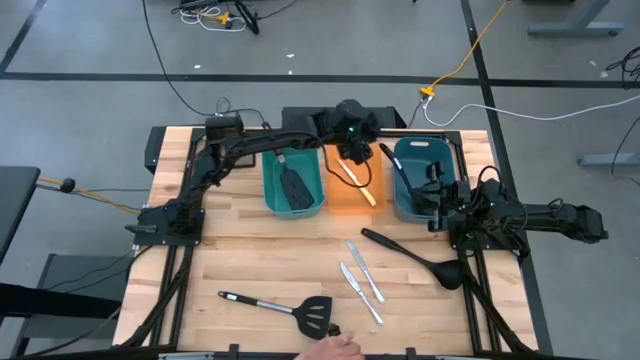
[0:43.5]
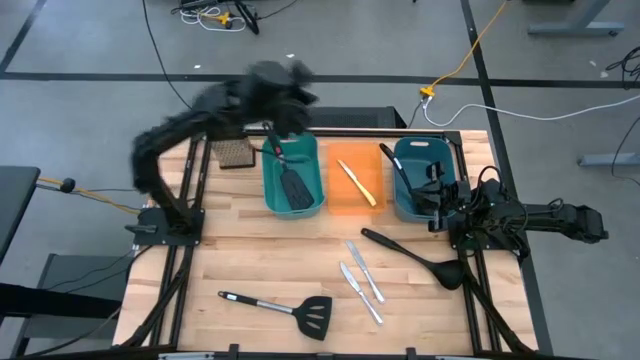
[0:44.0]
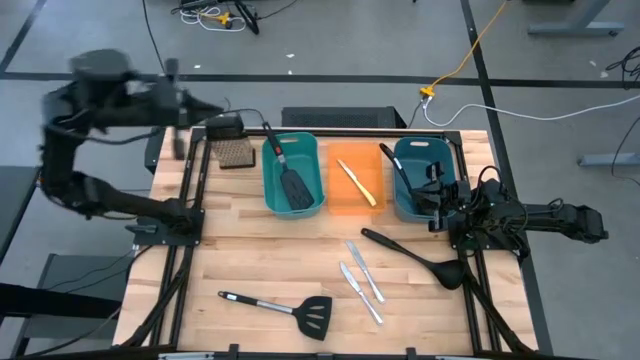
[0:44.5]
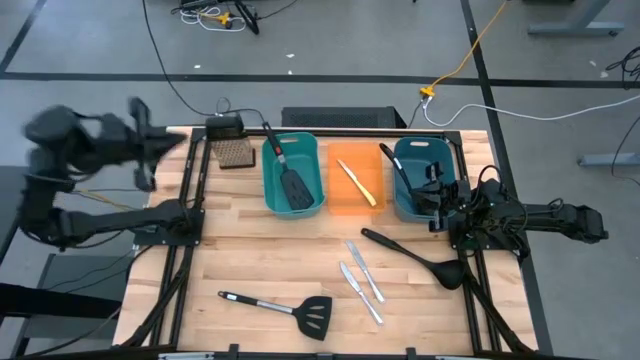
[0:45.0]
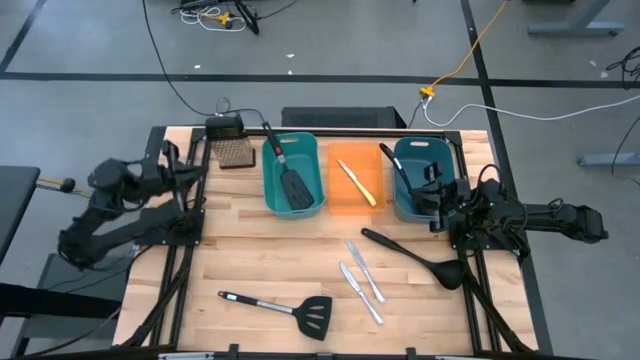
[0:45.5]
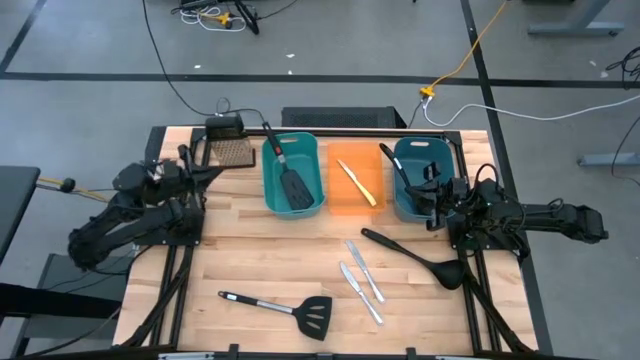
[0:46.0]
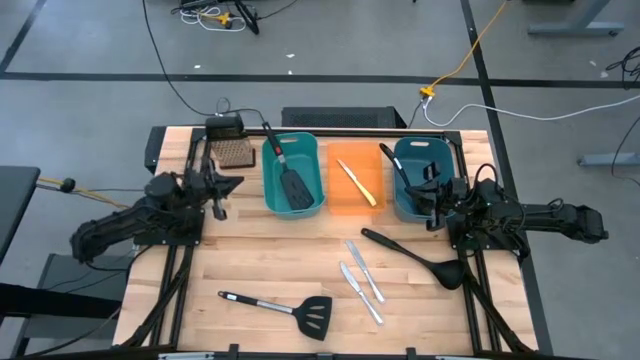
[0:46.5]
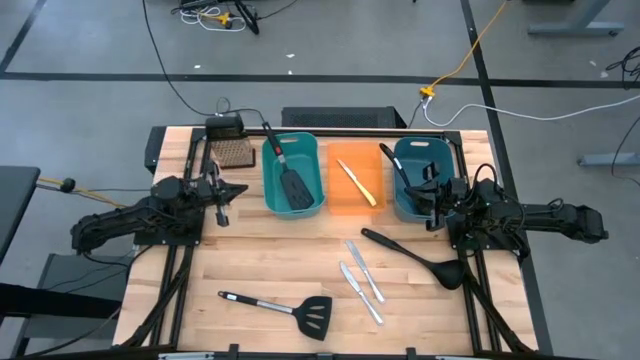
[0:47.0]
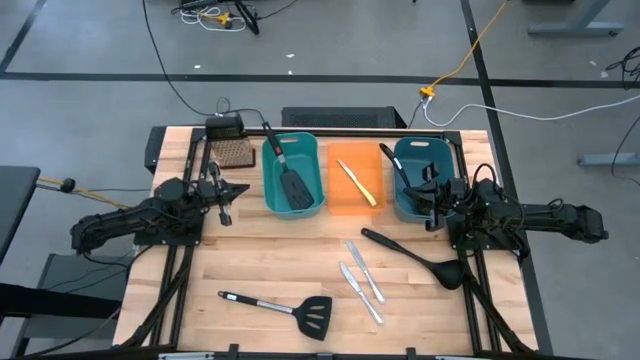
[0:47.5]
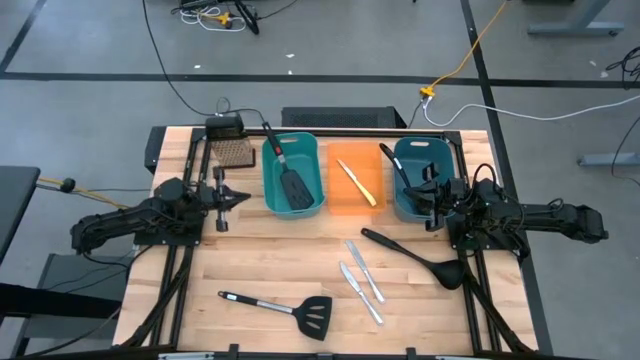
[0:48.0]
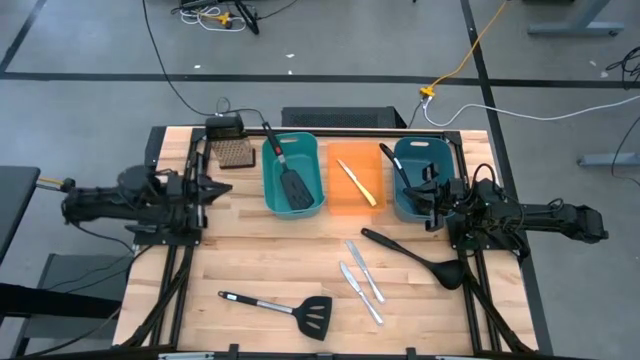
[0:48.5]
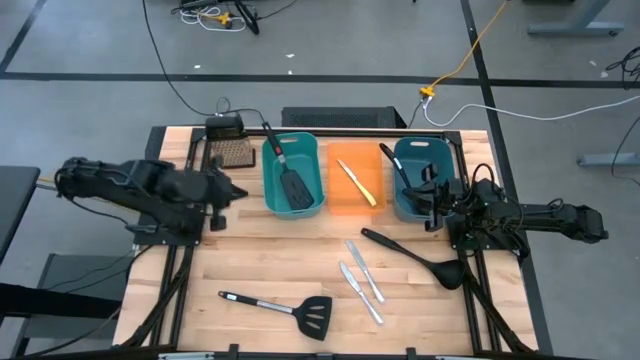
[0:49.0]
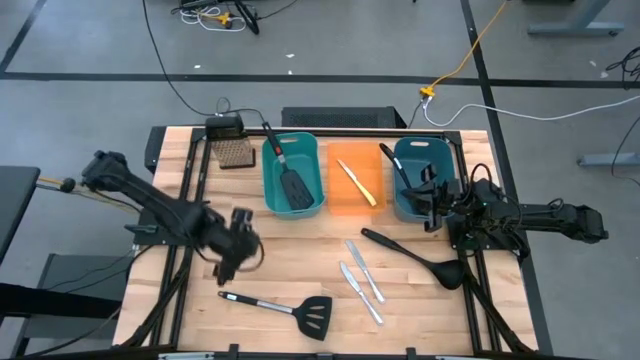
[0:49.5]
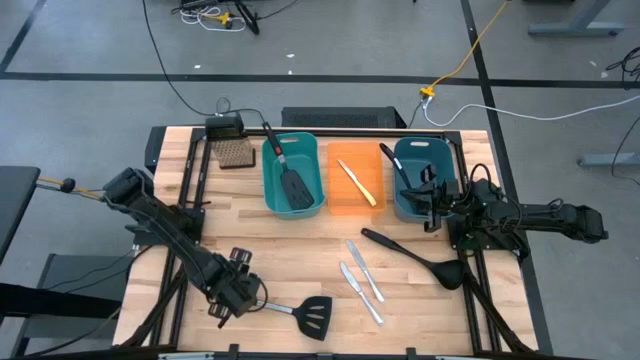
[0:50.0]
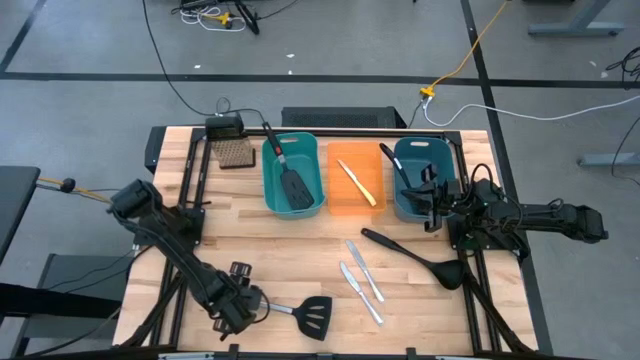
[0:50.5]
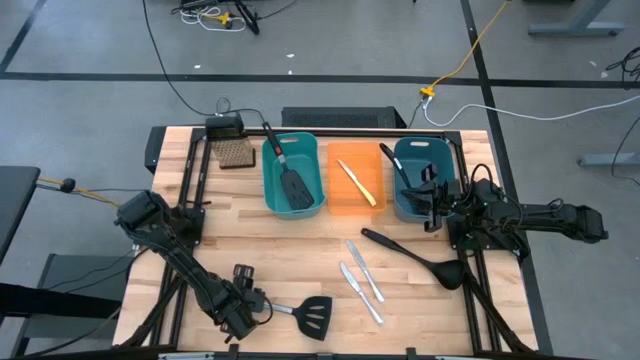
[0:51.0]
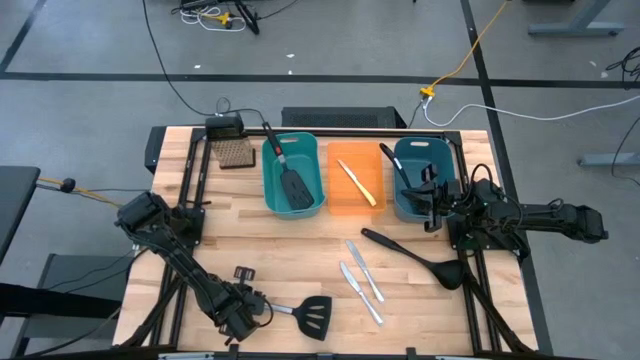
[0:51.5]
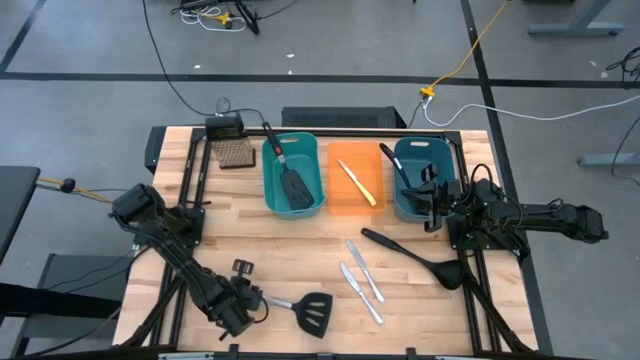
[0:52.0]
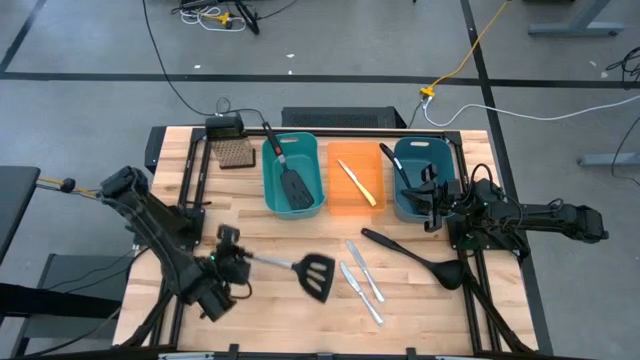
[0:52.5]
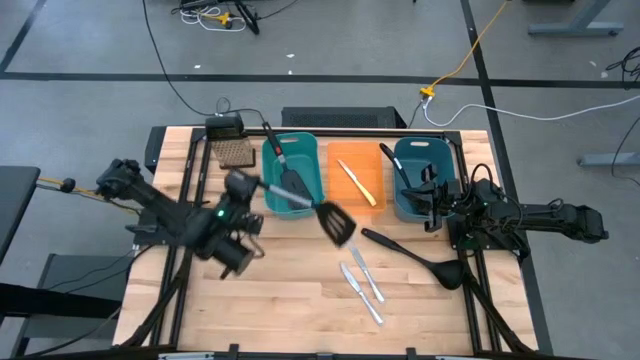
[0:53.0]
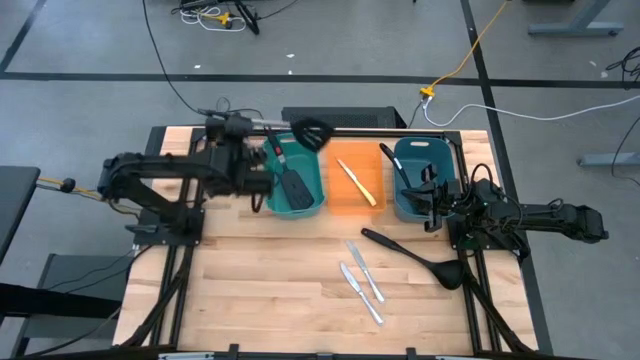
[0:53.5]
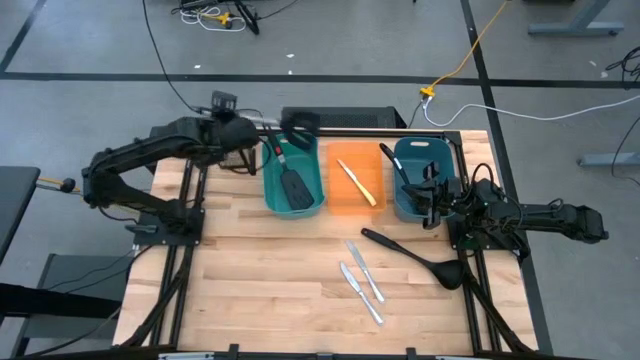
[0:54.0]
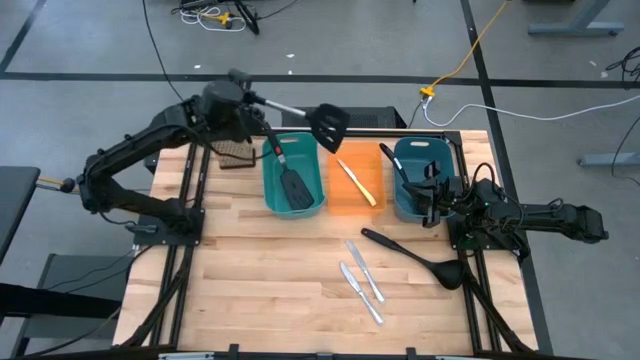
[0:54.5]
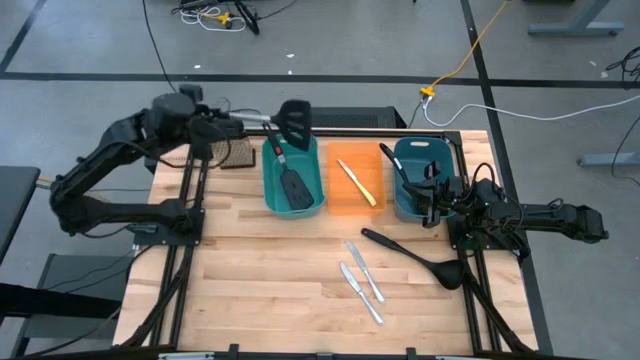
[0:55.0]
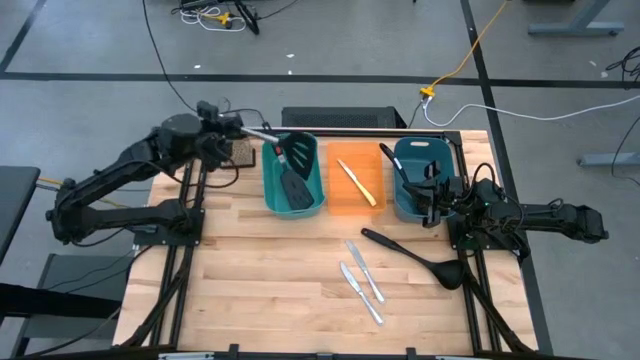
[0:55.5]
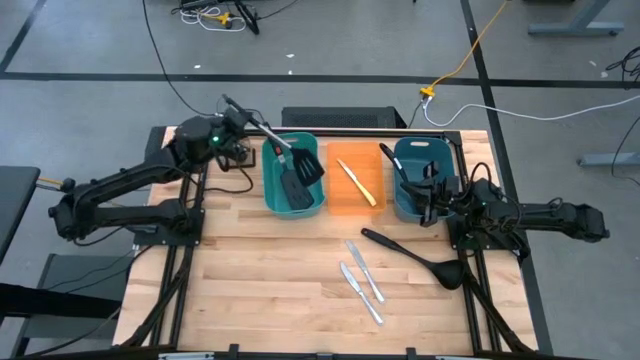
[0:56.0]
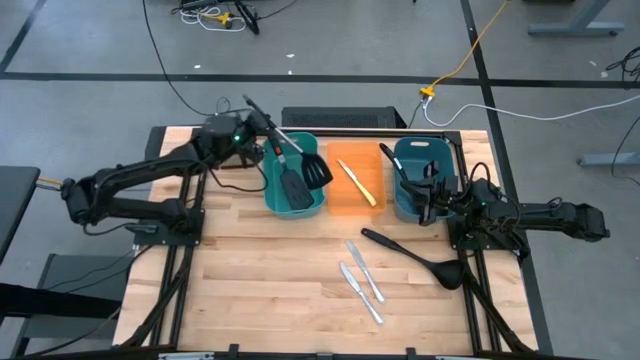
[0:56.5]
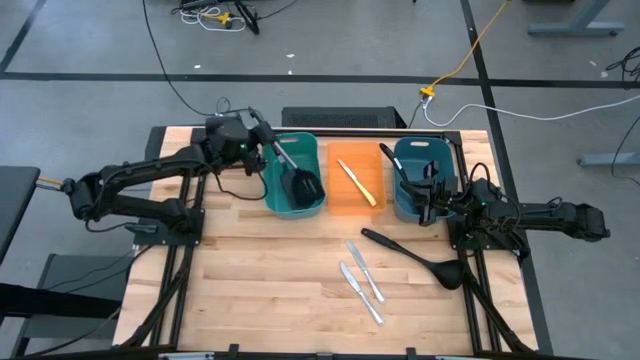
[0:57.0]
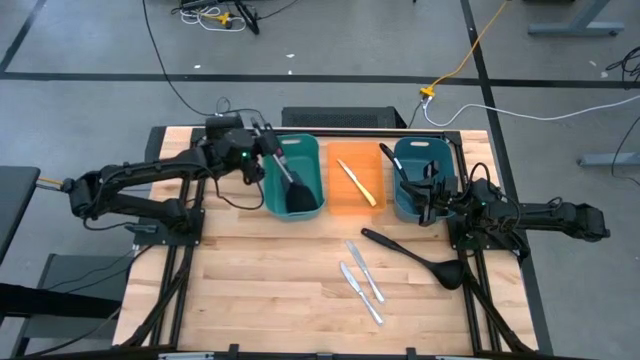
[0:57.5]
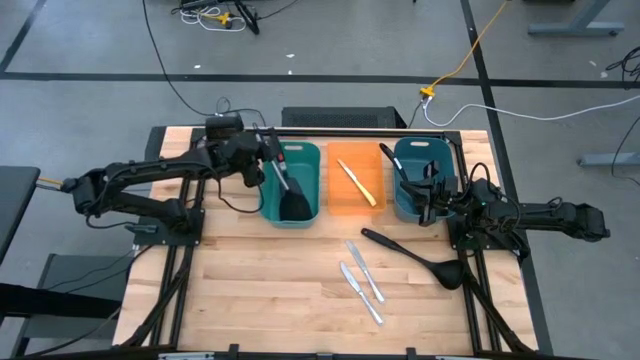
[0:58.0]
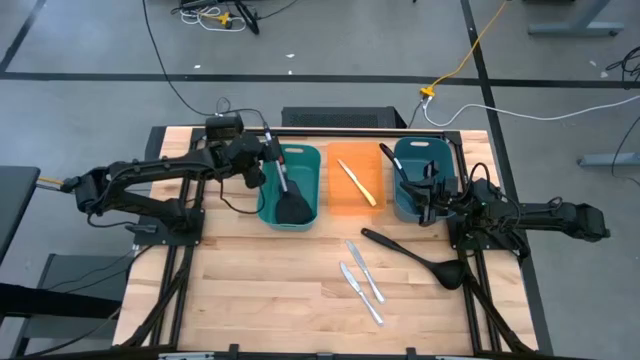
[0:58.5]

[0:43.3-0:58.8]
Task: Pick & Place Kitchen Items
Put the spatula into the green container

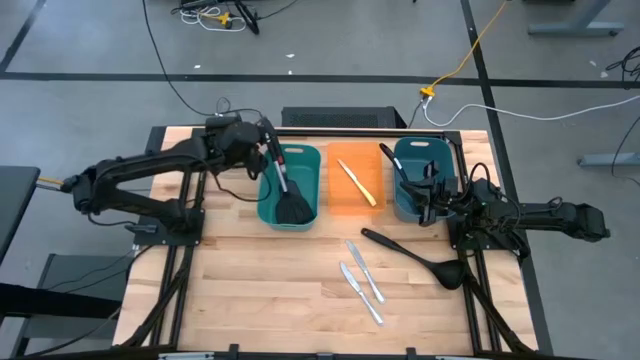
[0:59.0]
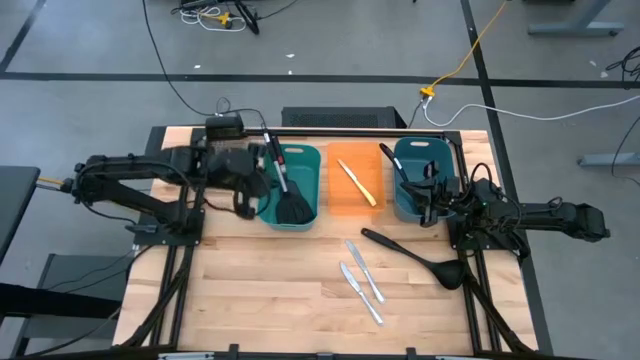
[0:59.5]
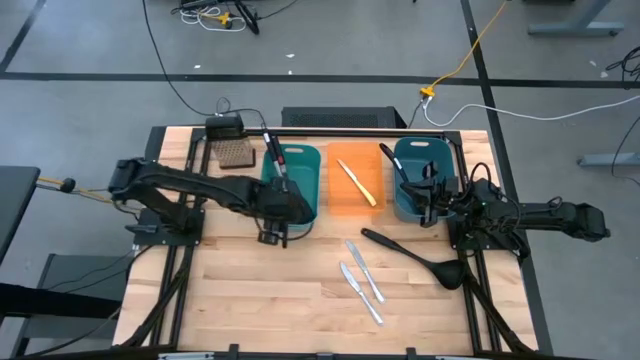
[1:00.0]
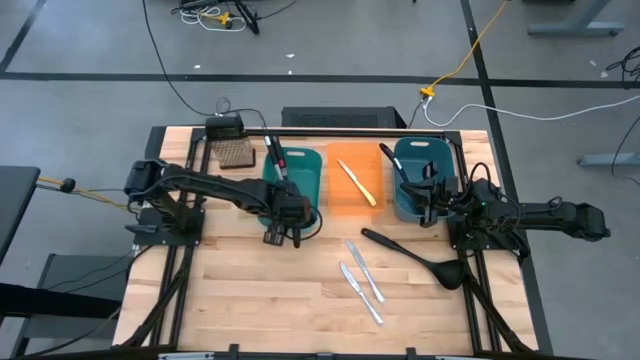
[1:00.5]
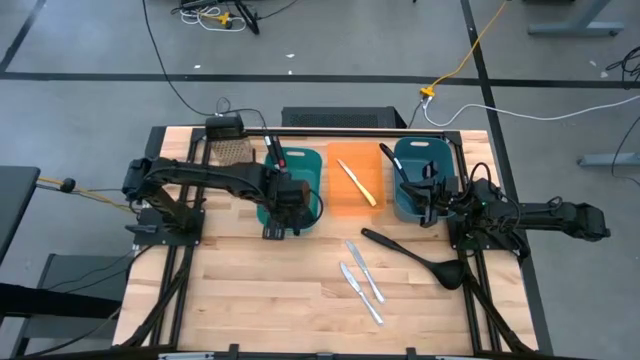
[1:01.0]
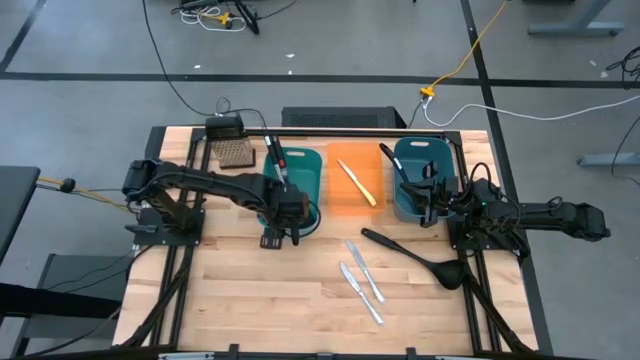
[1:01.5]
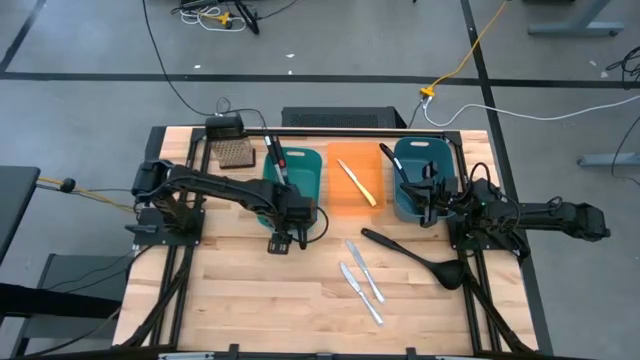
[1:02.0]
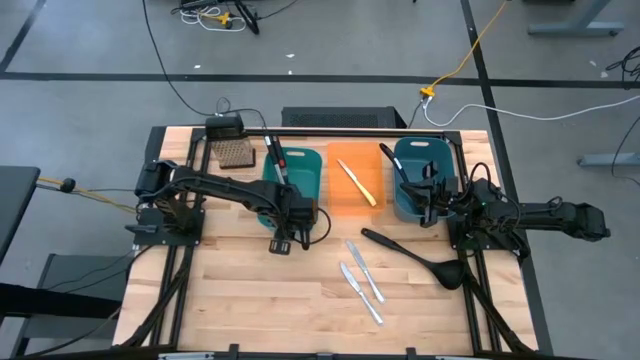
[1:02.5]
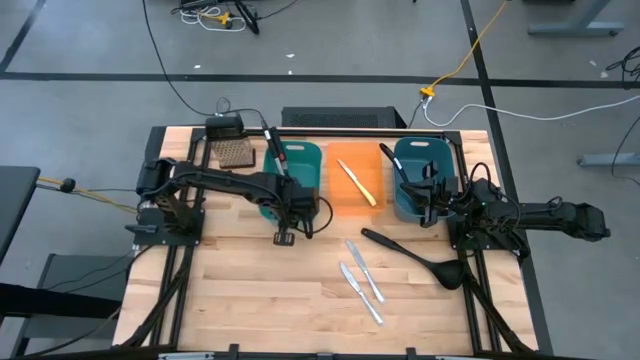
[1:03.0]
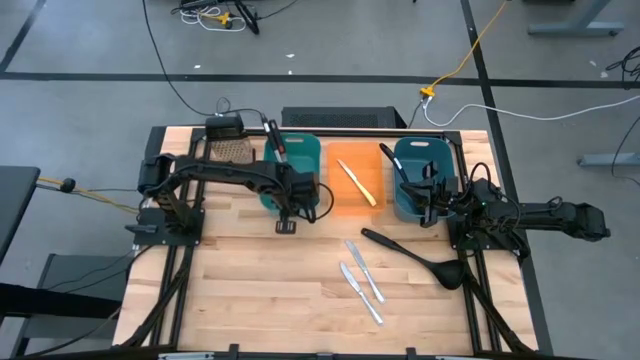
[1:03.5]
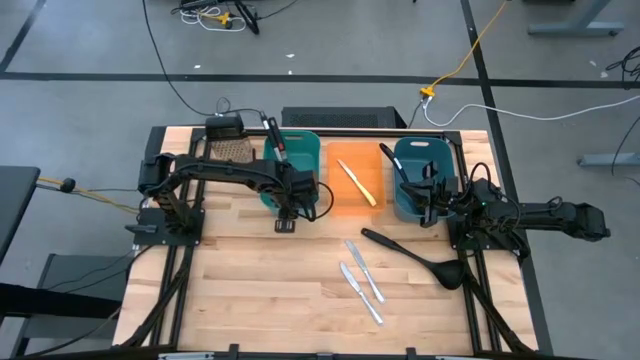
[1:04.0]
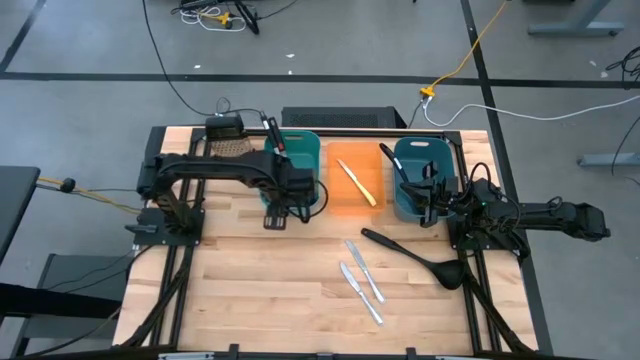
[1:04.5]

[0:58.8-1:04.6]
Adjust the green container

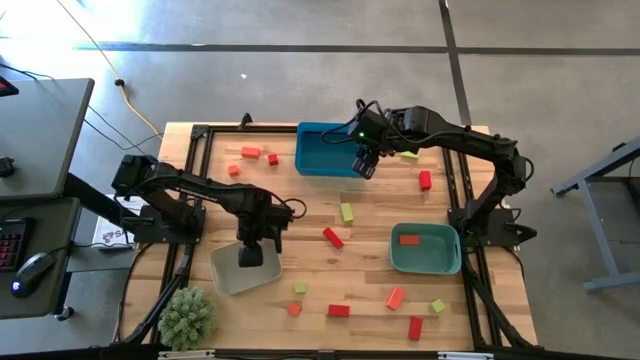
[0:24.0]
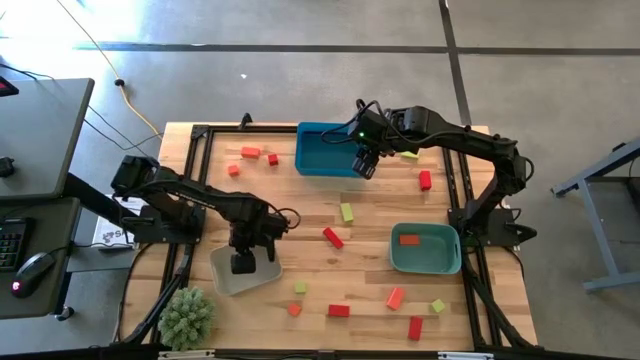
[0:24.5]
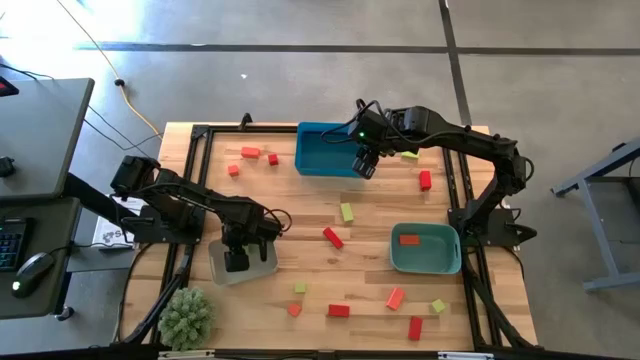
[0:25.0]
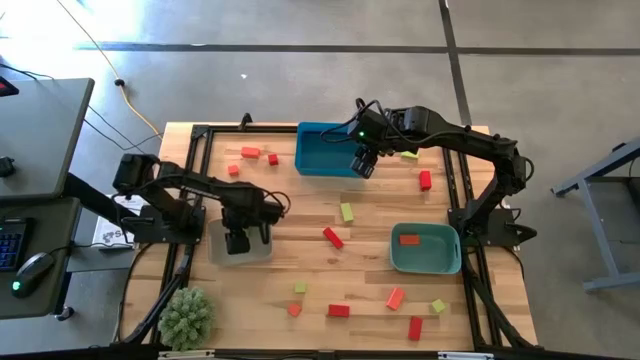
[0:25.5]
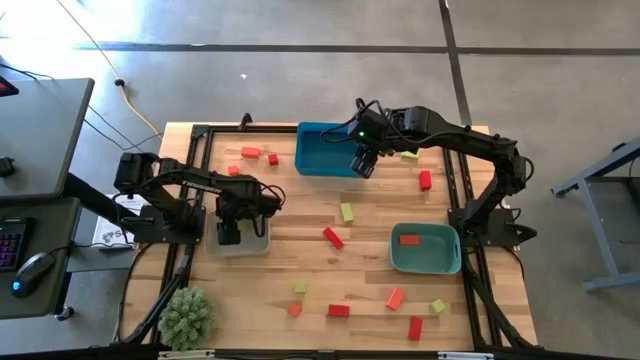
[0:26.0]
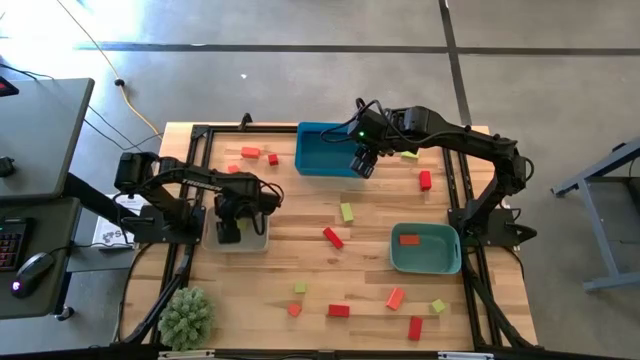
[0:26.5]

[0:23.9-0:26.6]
Task: Sort & place blocks by color
Adjust the white bin
